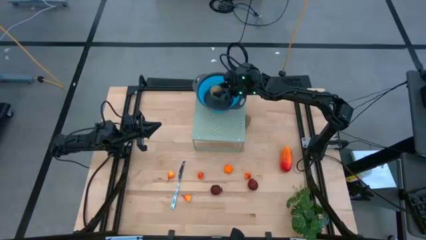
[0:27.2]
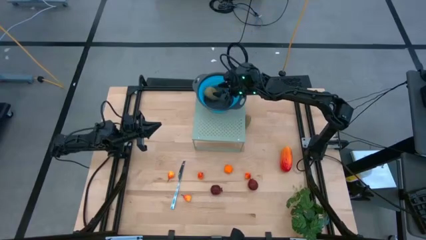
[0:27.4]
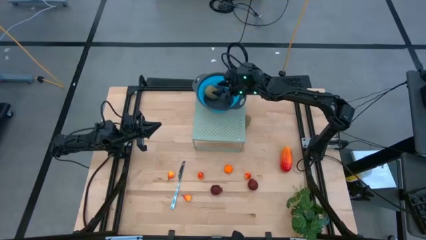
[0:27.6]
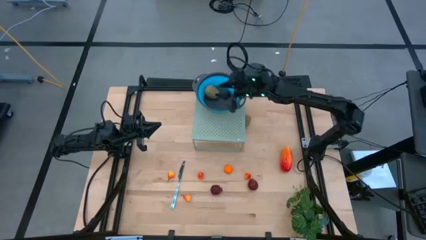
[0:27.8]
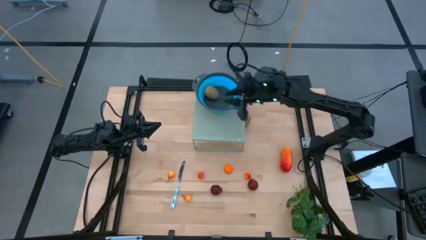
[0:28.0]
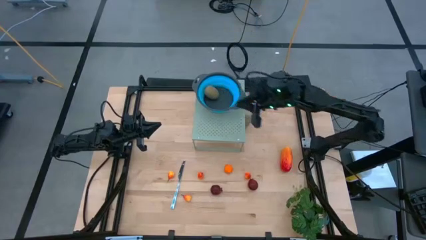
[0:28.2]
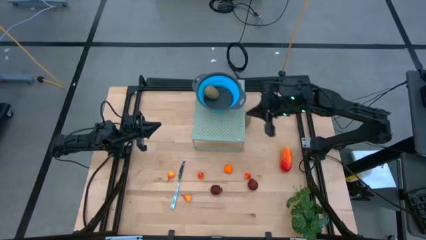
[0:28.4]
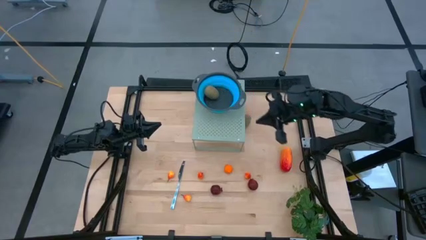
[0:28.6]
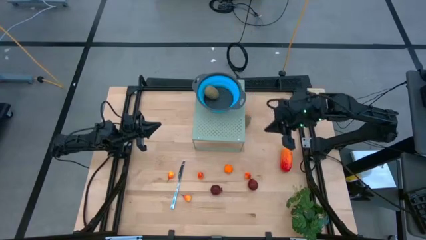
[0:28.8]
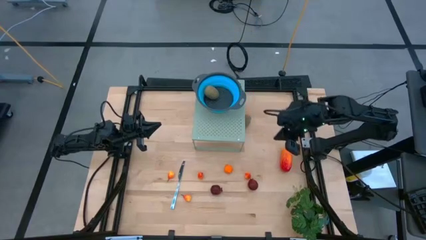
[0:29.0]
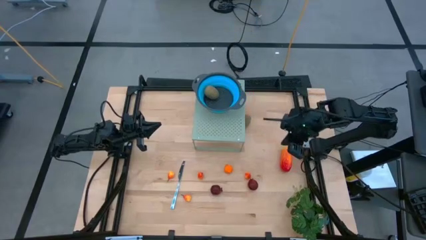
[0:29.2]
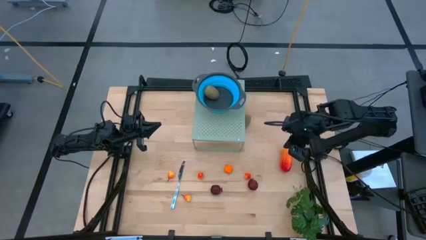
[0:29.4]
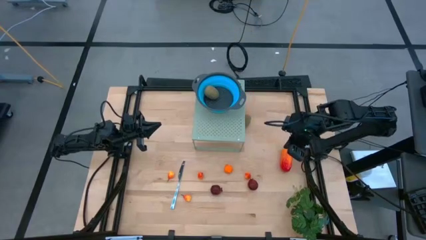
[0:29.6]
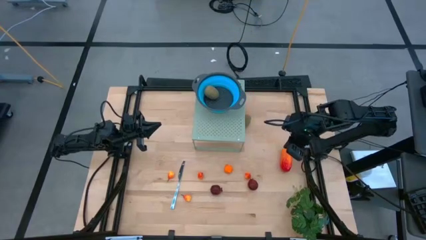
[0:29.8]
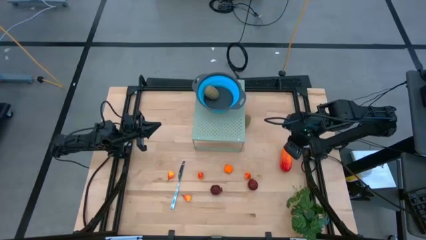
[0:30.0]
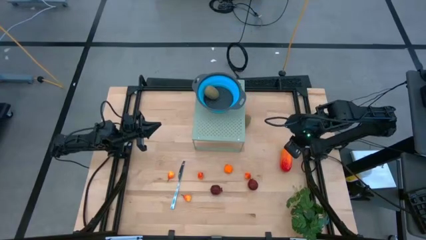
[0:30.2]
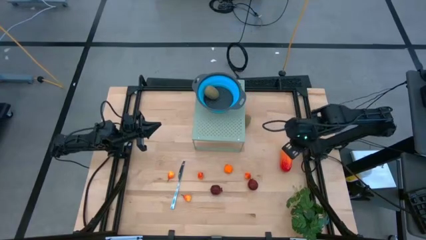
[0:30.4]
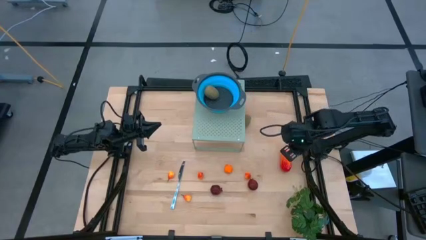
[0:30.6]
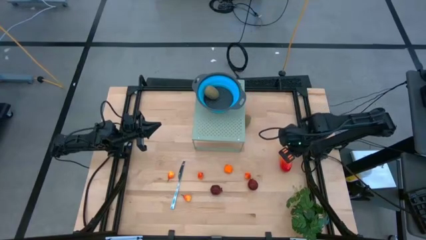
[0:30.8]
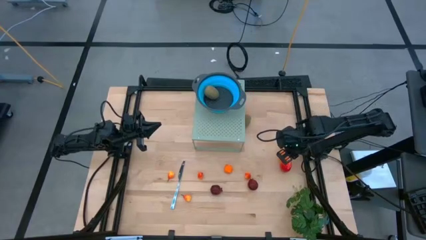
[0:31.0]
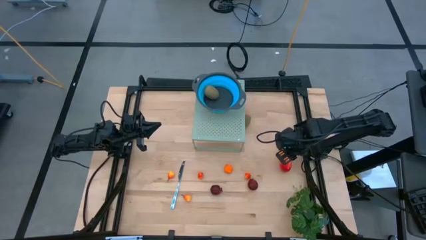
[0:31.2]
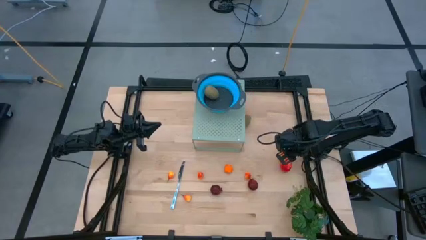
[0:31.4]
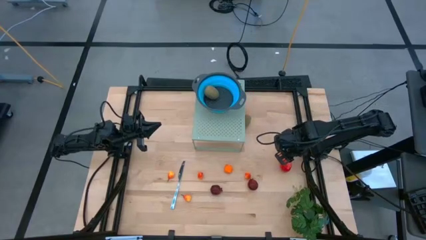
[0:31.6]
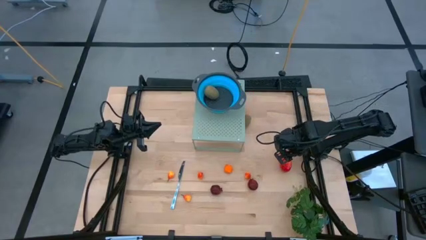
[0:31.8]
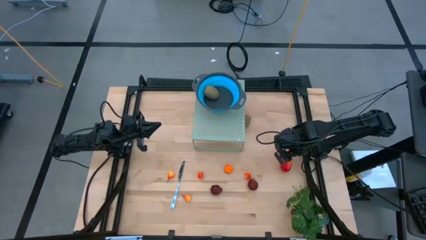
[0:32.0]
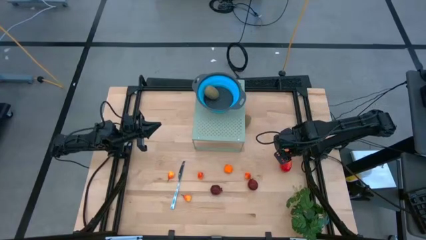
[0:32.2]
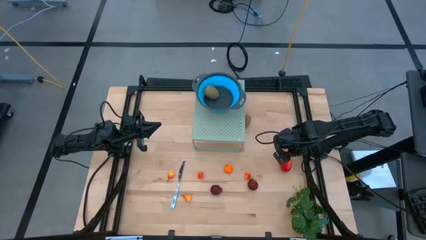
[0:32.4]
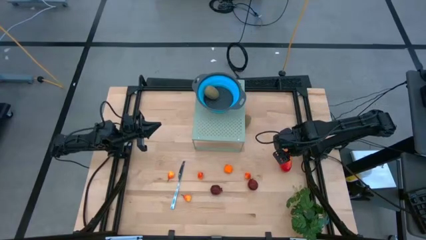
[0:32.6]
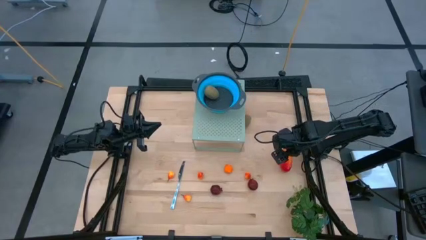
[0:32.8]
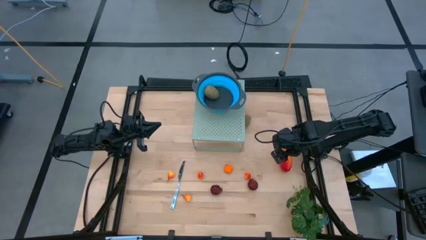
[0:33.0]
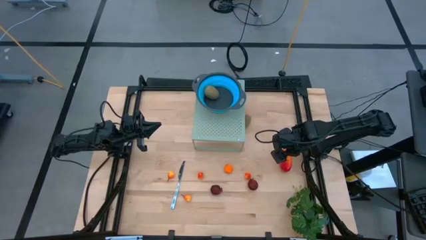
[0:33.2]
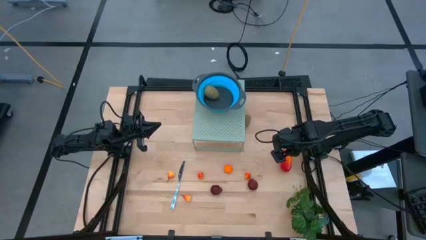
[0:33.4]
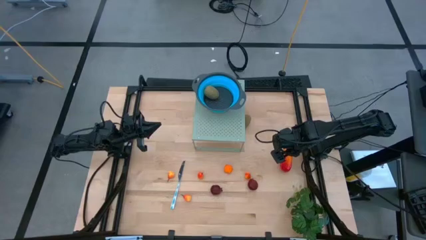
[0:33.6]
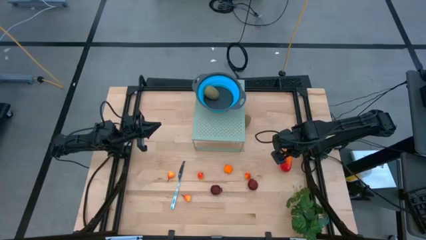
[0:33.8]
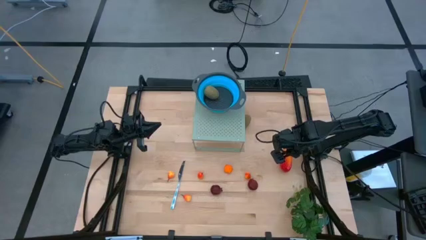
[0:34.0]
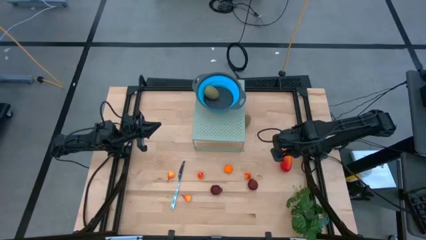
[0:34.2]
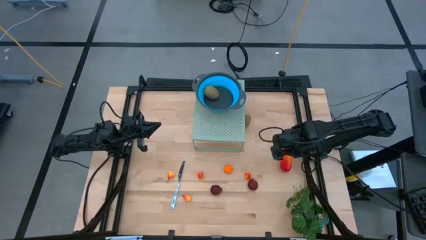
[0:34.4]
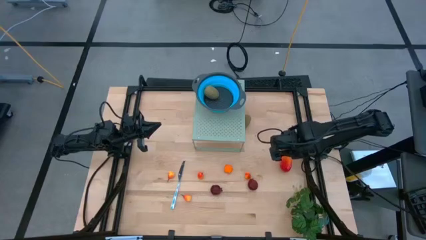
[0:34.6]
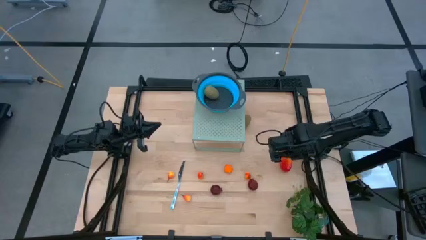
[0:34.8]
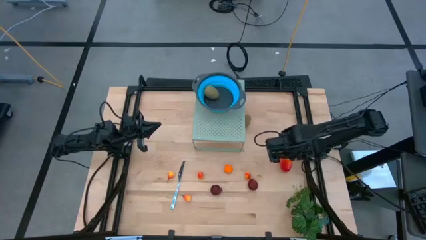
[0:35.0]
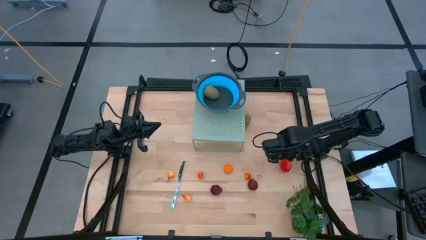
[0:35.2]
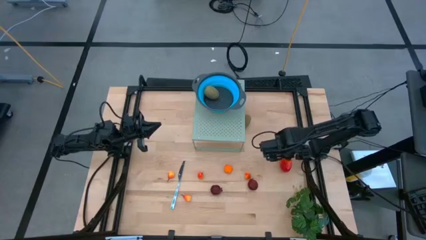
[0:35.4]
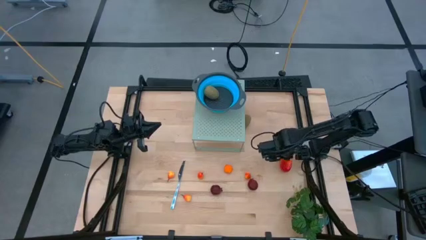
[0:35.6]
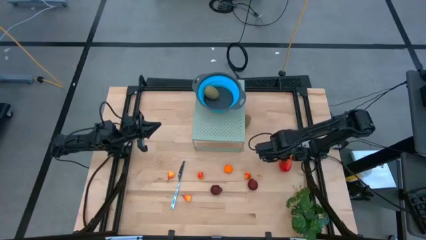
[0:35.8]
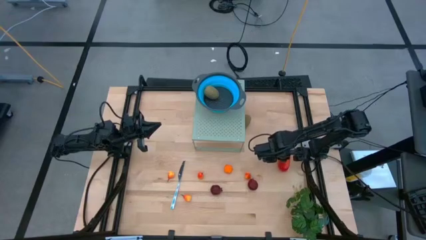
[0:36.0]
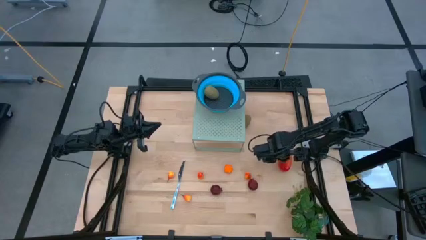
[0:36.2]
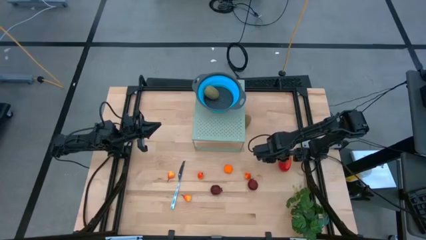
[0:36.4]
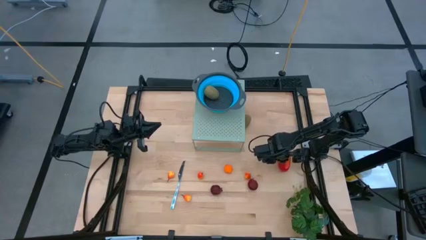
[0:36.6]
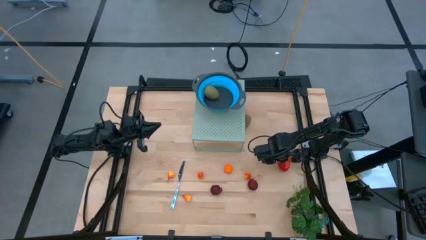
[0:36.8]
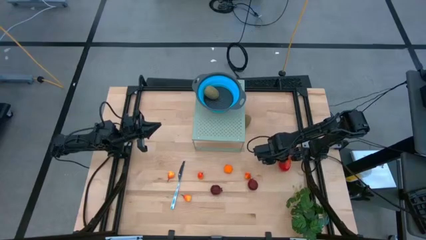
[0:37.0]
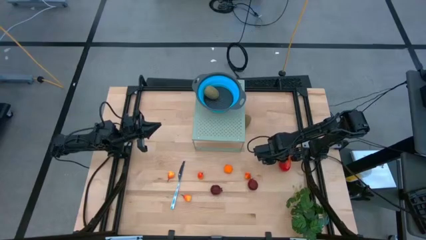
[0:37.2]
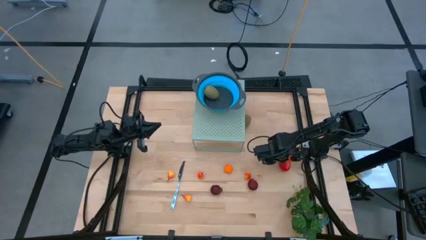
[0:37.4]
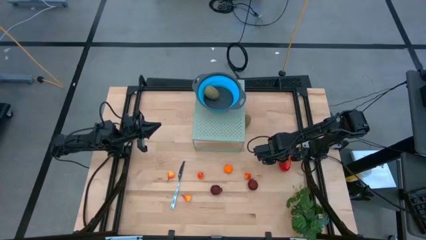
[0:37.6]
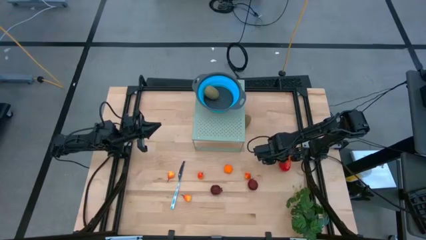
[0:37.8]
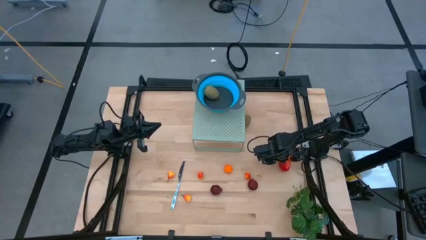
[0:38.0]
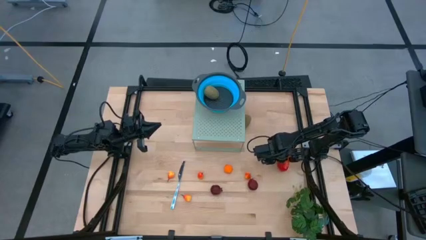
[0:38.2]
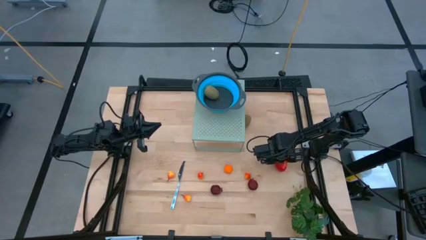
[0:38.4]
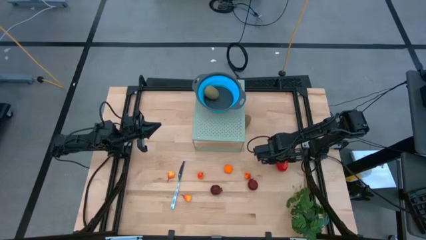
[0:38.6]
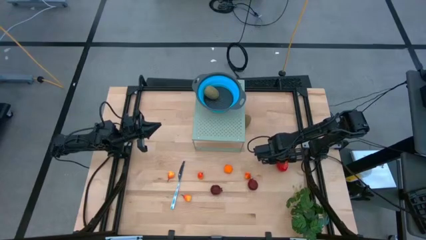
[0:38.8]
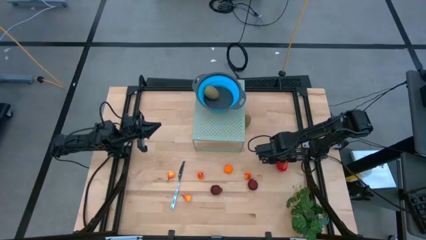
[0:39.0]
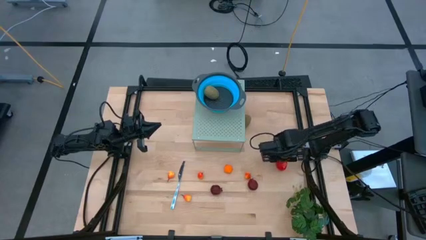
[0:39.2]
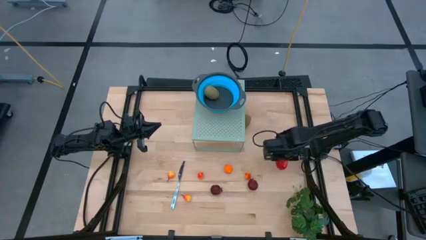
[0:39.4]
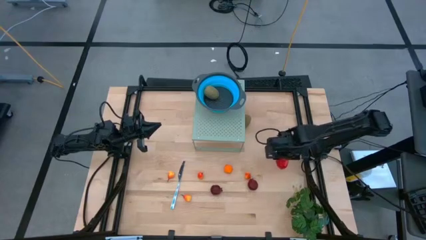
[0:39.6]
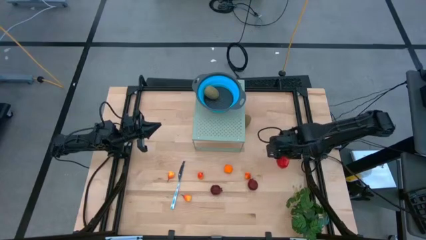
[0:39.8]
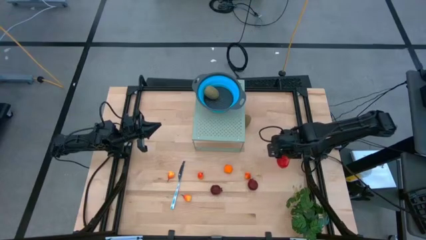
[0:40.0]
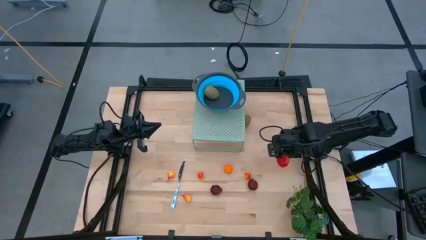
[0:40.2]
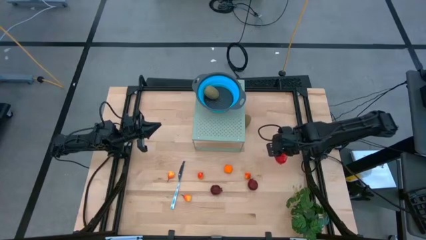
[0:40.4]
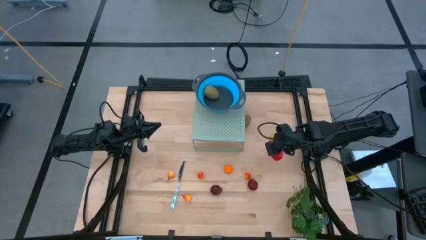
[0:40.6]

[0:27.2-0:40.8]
Task: Pick & Place Fruit
Put the mango into the blue strainer bowl on the shelf

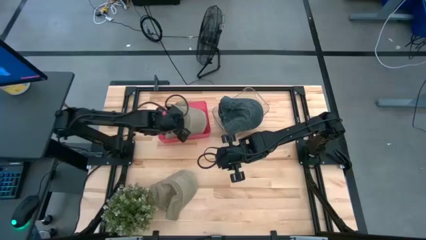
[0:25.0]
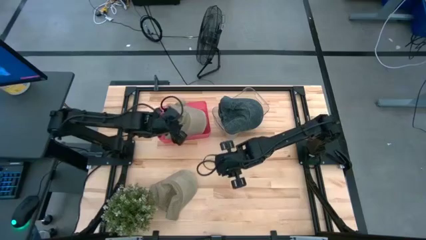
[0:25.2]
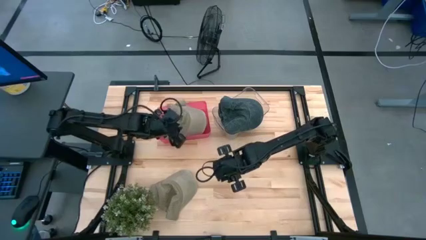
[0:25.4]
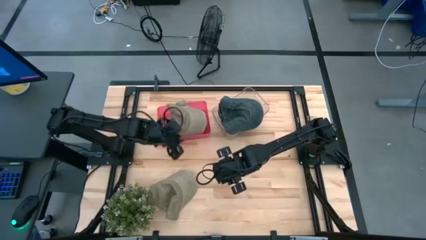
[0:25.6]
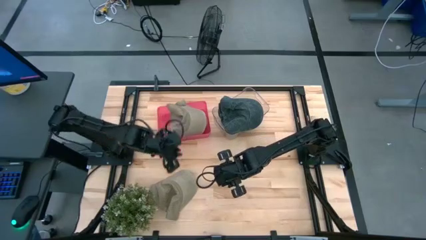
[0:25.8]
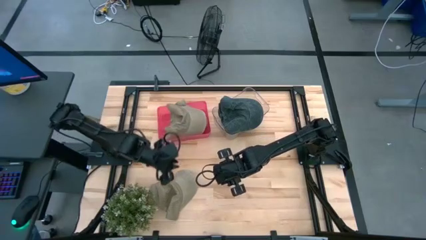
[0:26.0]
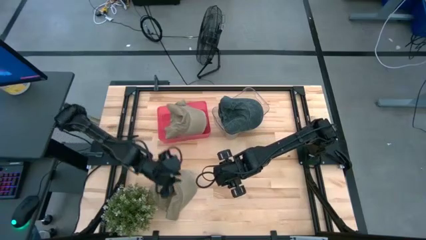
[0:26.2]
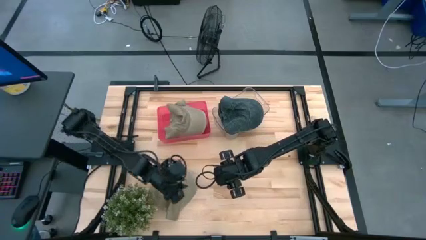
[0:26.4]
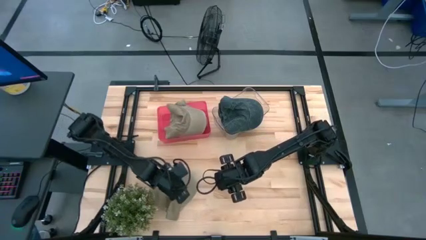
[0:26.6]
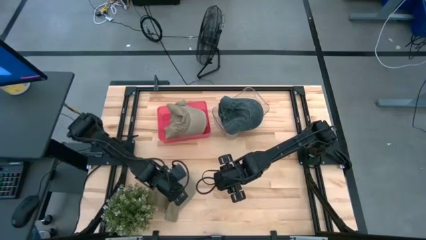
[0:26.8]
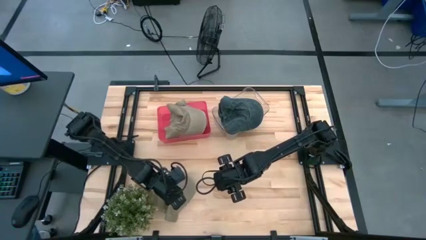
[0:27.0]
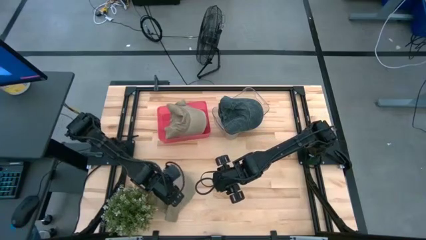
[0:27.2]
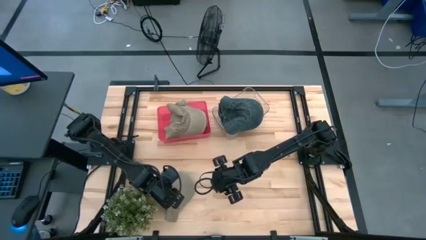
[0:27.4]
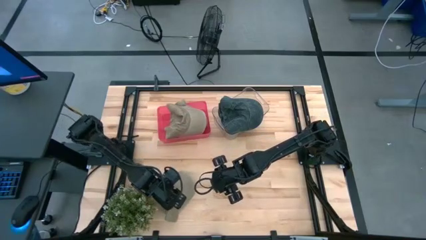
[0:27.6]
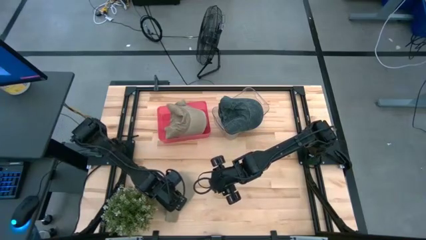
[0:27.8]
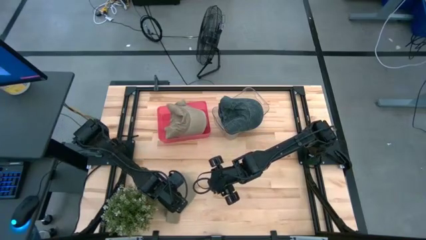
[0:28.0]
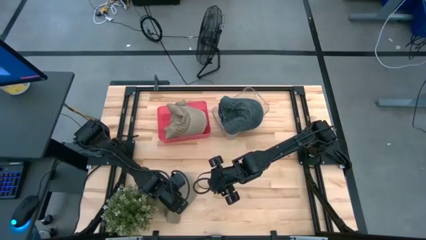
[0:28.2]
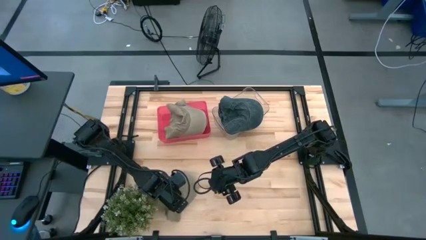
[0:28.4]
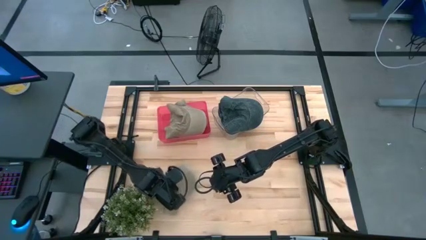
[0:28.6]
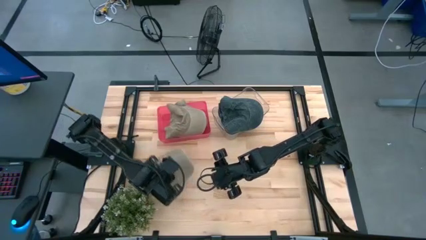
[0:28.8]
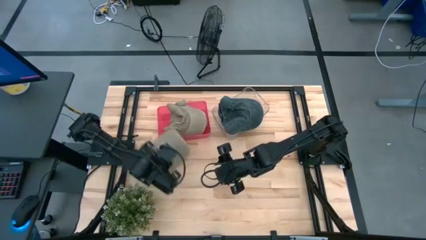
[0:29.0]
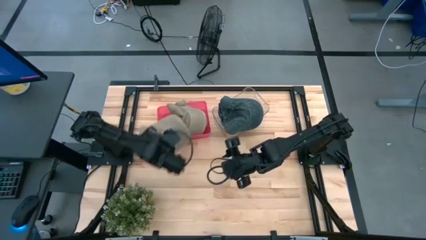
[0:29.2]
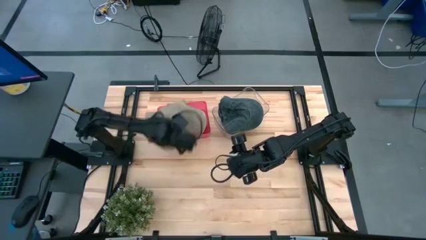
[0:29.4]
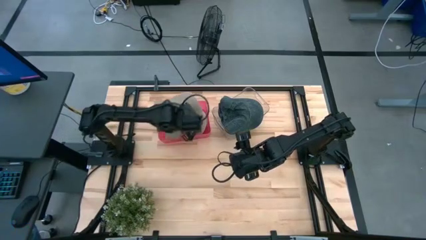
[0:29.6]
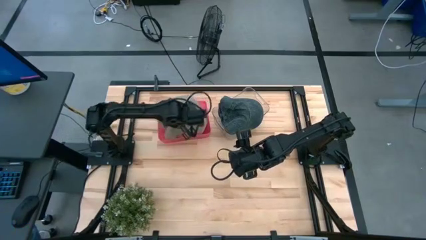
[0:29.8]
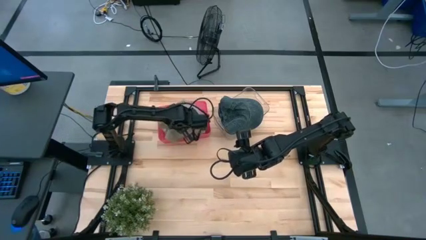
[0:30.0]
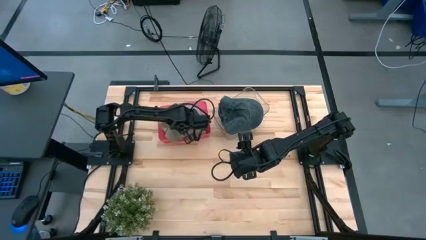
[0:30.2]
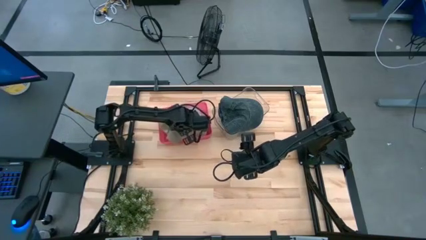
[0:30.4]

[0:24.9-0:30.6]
Task: Pick & Place hat
Put the brown cap into the red bin
